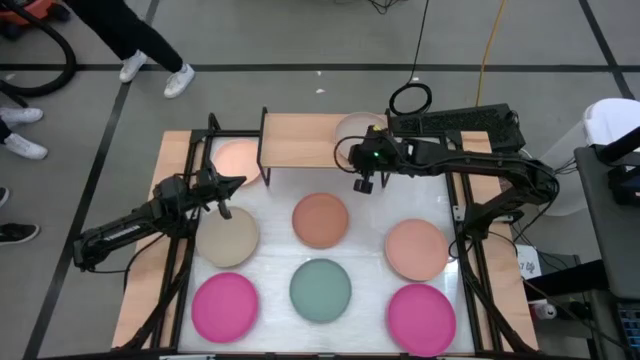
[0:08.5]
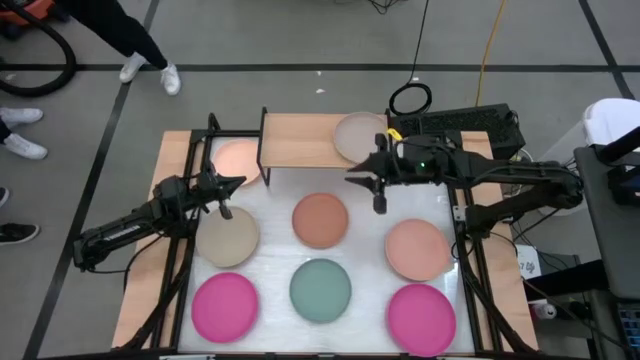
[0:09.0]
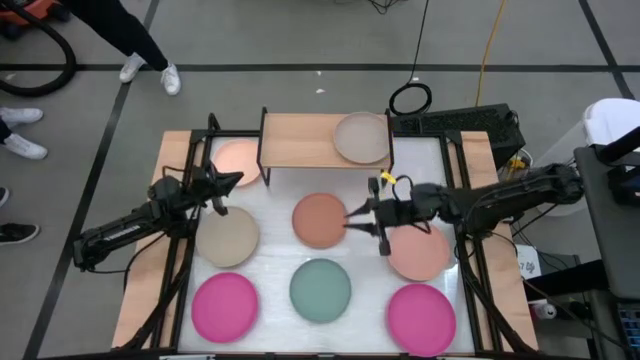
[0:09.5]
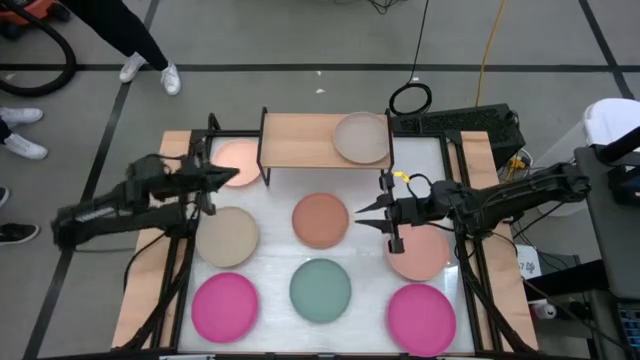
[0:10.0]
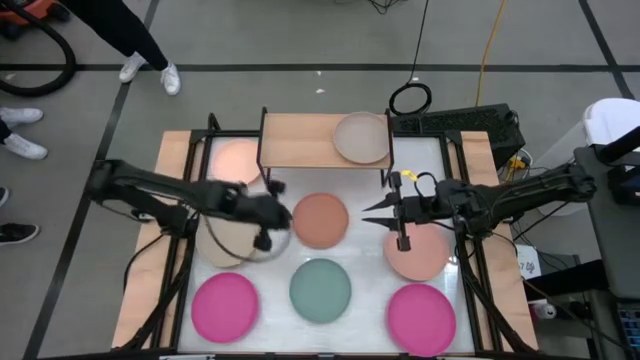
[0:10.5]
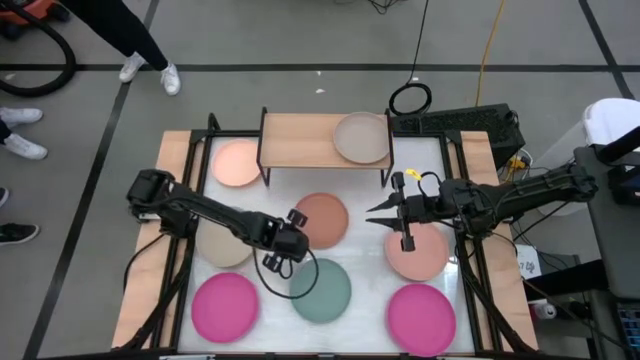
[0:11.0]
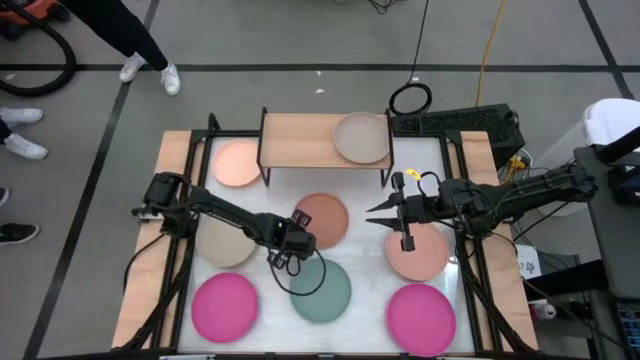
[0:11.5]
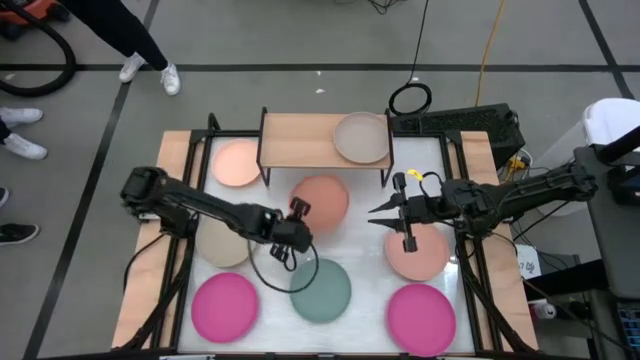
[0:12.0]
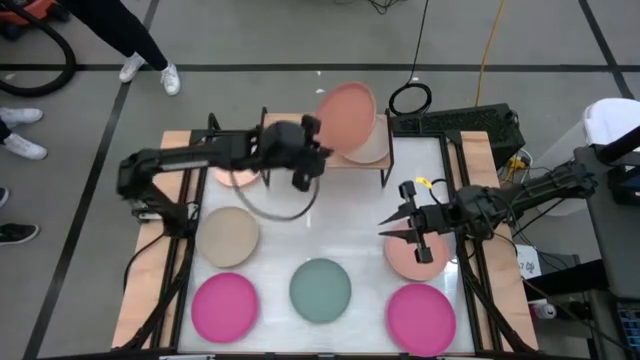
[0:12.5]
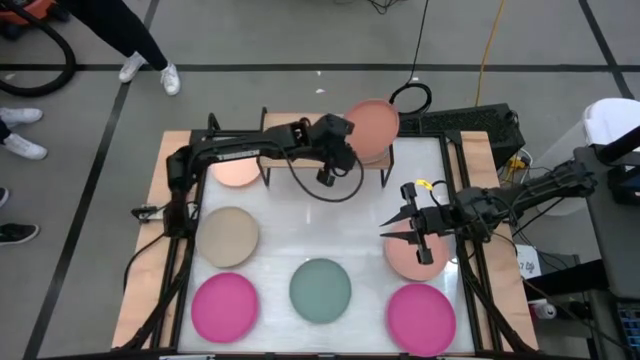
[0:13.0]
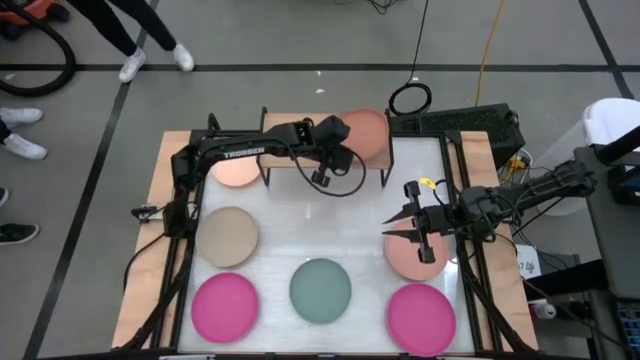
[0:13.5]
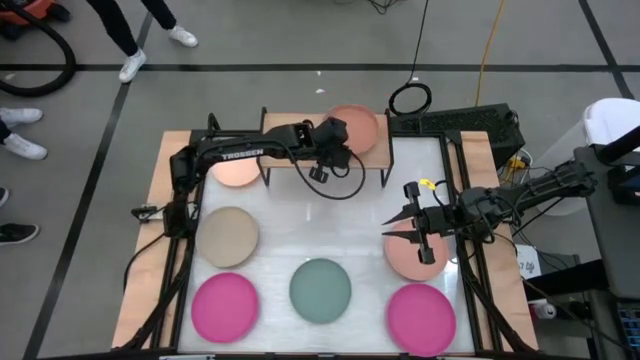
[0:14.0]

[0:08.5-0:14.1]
Task: Place and stack plates onto a shelf
Stack the orange plate on top of the gray plate on the shelf

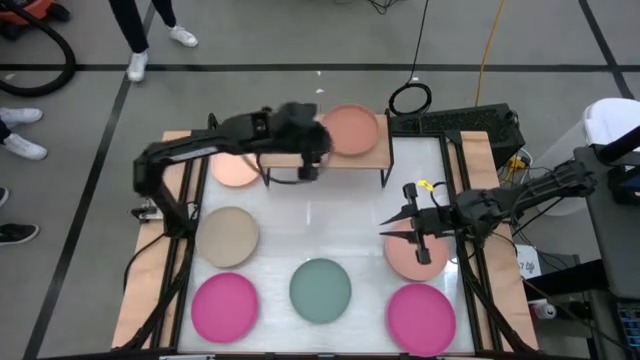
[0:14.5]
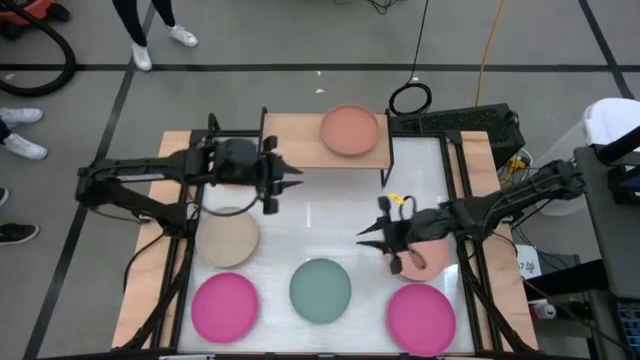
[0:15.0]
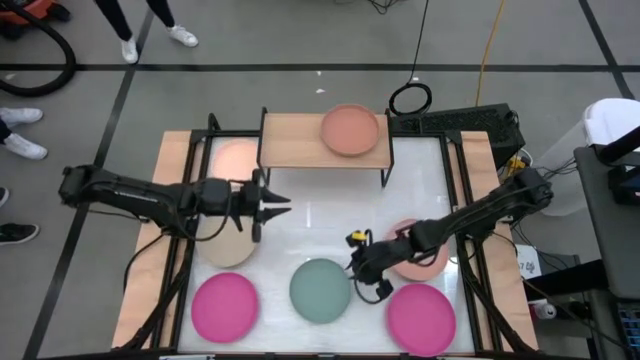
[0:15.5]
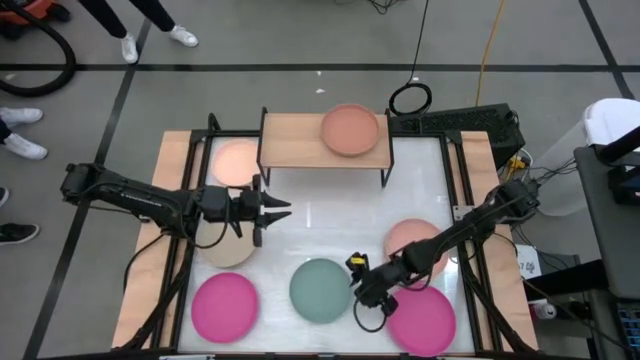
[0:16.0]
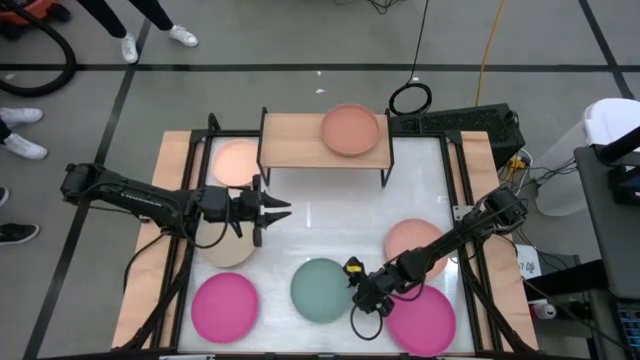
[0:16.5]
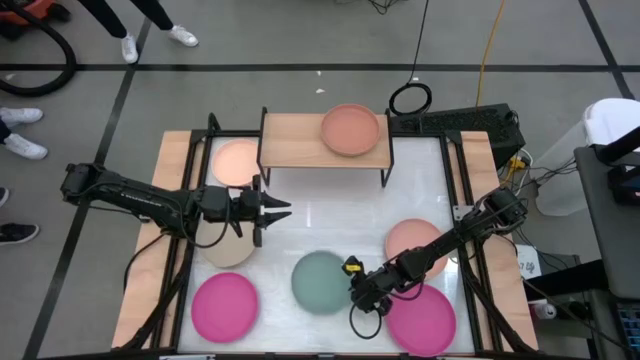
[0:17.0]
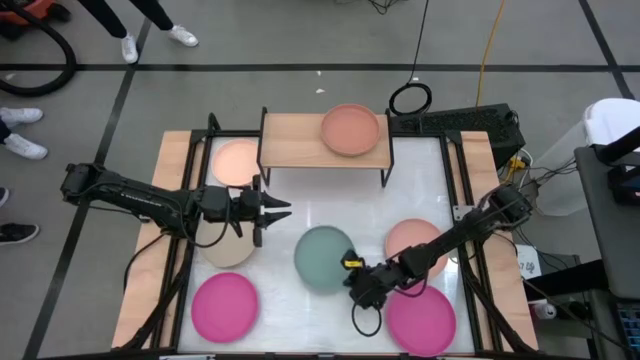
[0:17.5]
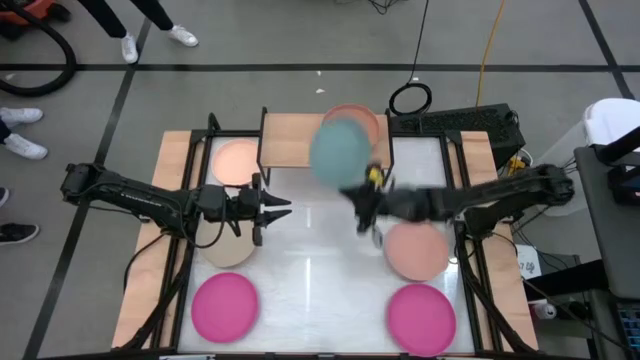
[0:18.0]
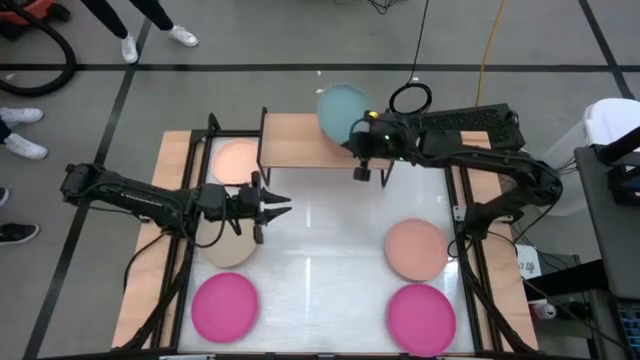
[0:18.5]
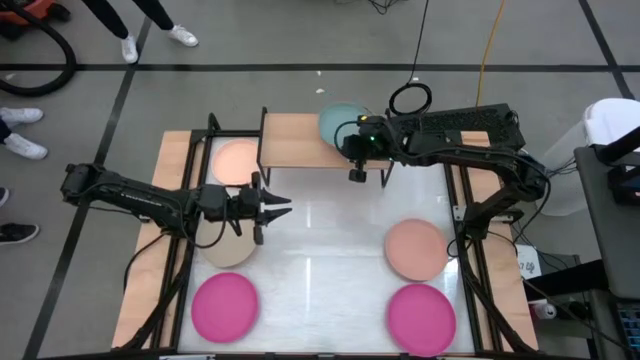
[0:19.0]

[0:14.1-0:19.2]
Stack the blue plate on top of the orange plate on the shelf

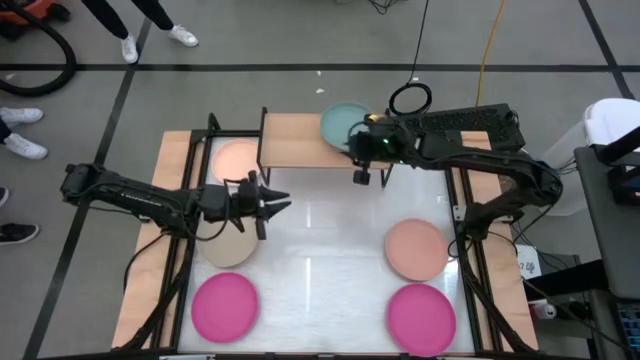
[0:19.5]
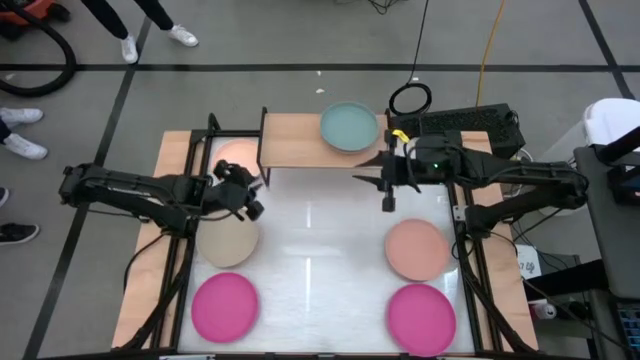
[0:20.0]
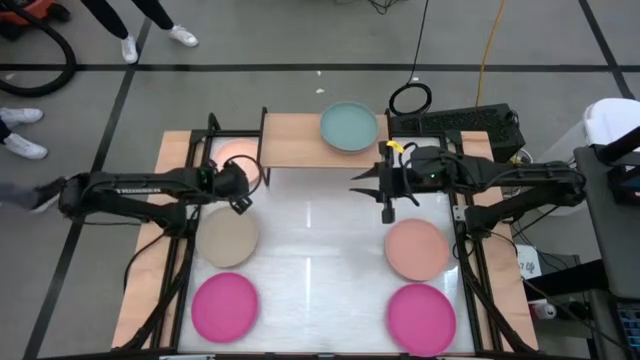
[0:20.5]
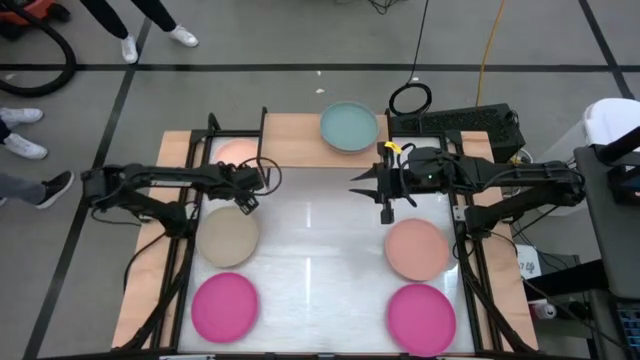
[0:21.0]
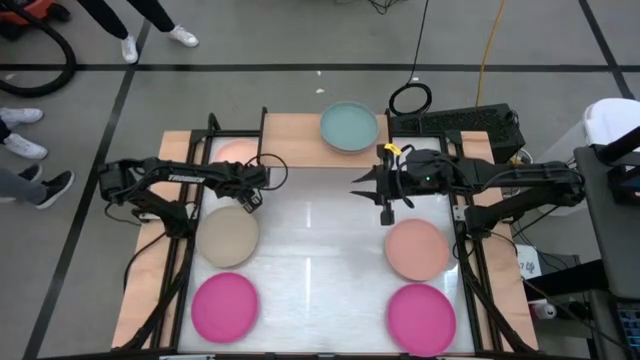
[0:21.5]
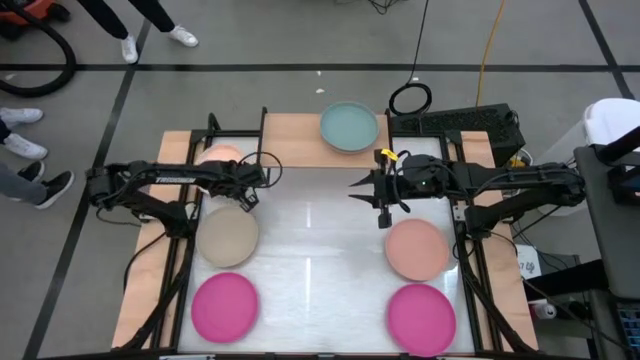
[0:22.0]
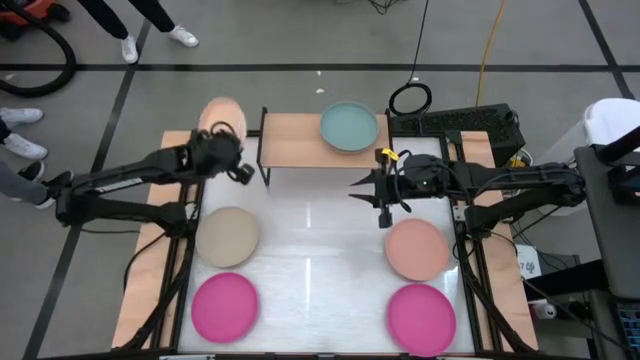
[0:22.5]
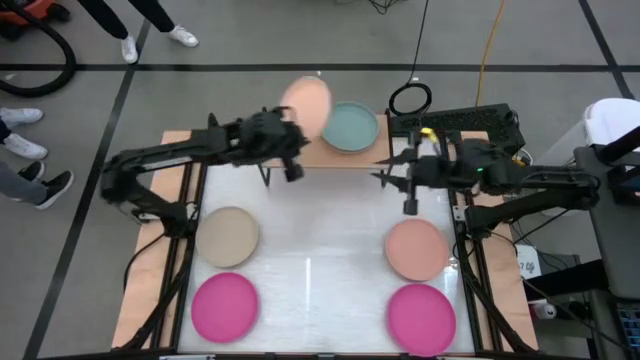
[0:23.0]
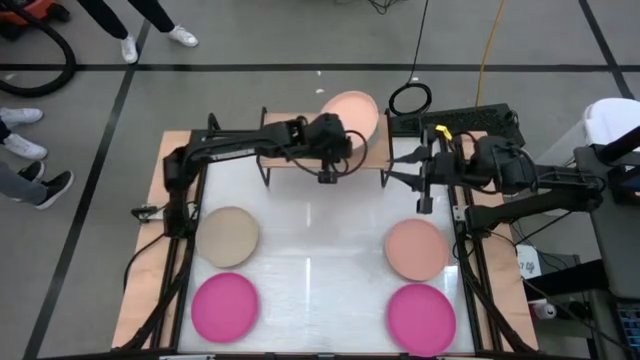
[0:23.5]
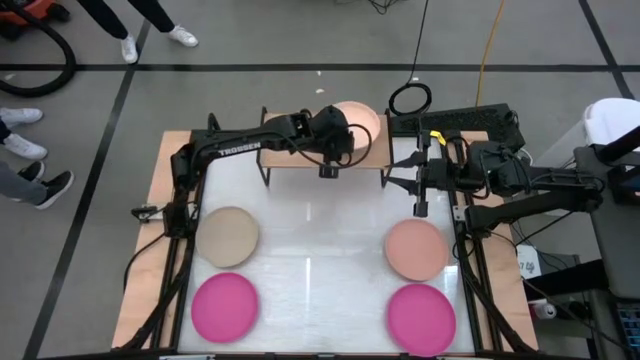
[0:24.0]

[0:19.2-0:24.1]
Stack the light orange plate on top of the blue plate on the shelf

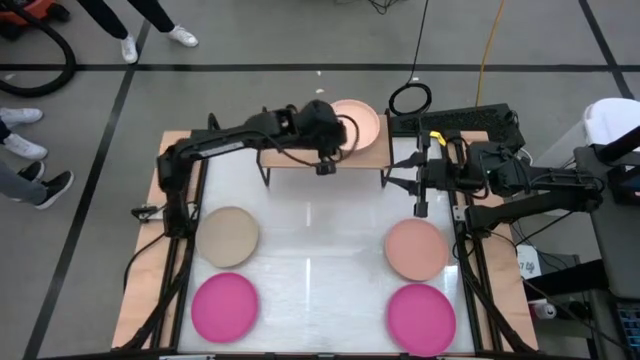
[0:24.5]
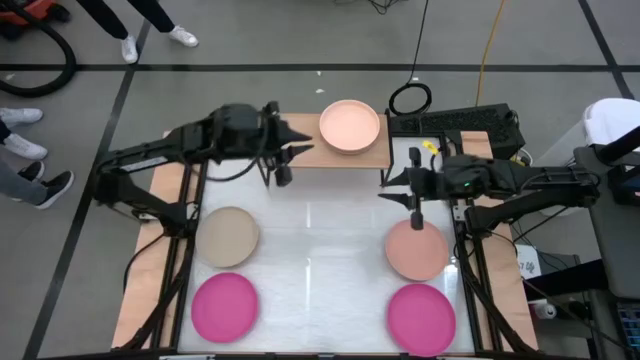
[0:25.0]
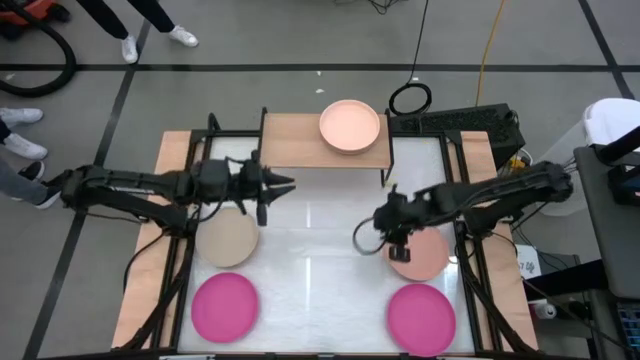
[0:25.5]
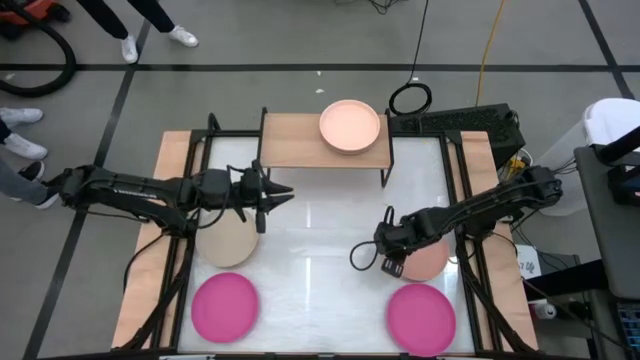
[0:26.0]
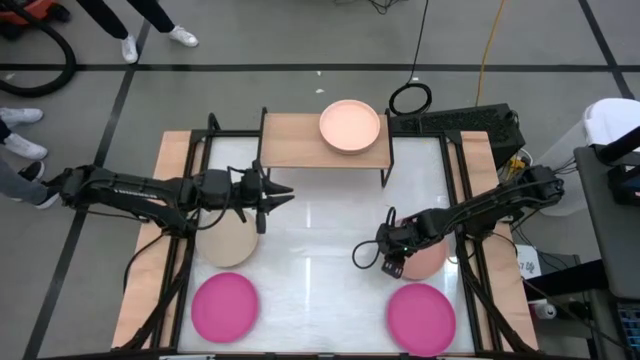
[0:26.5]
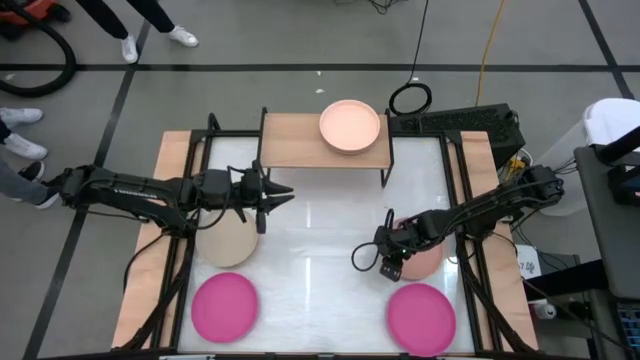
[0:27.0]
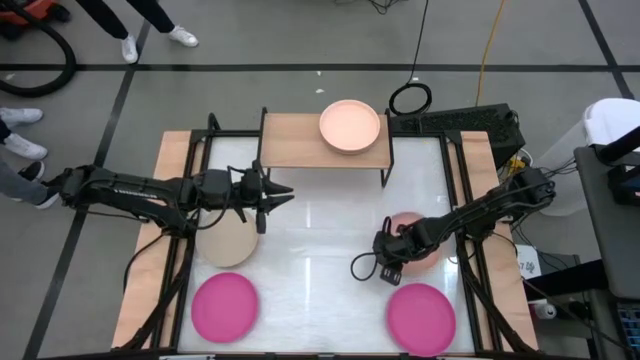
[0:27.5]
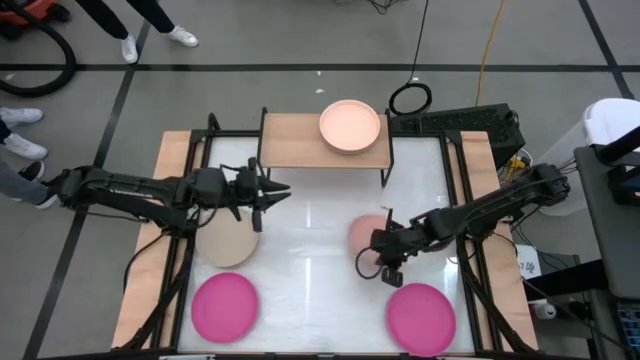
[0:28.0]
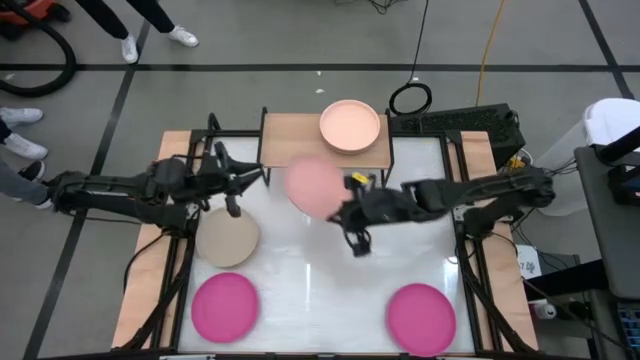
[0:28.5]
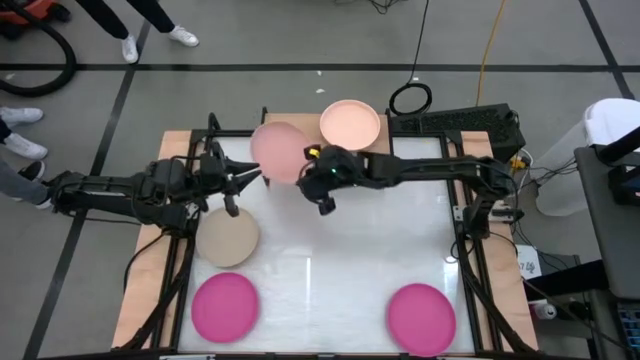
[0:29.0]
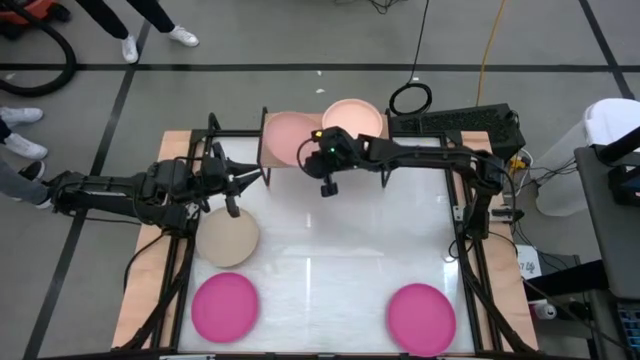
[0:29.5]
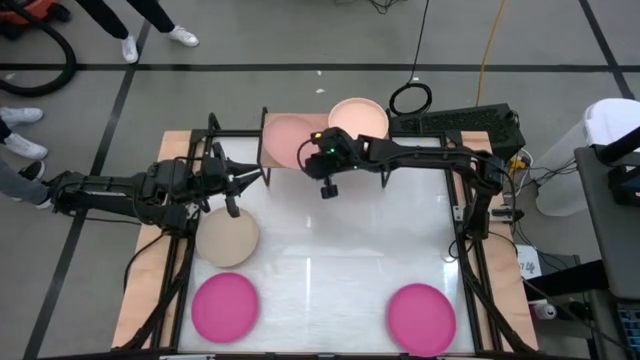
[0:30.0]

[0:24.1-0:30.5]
Put the light pink plate on the shelf
